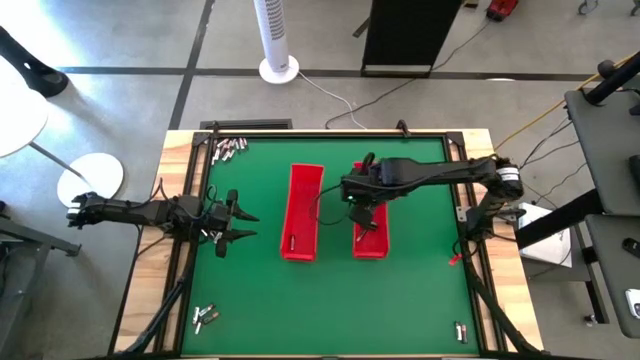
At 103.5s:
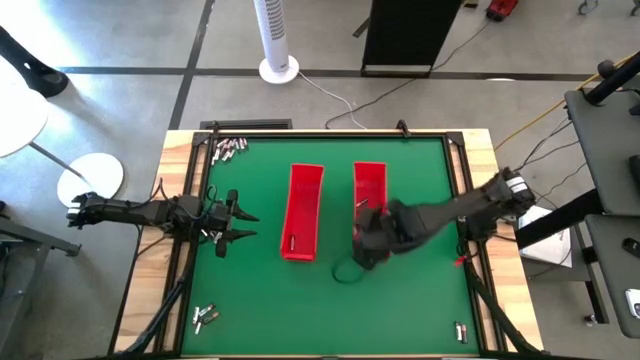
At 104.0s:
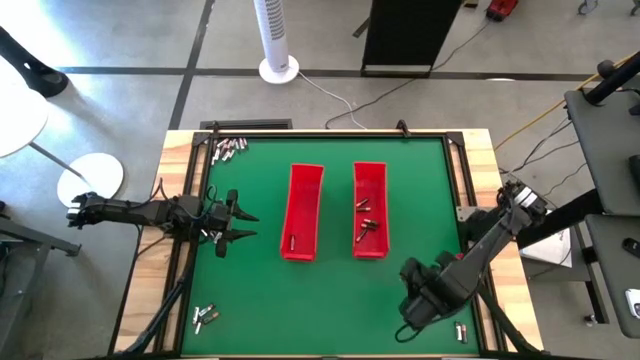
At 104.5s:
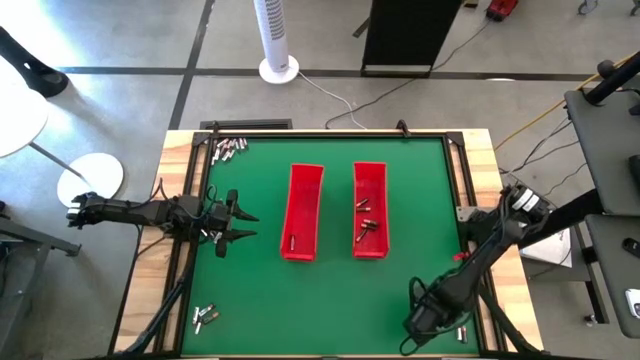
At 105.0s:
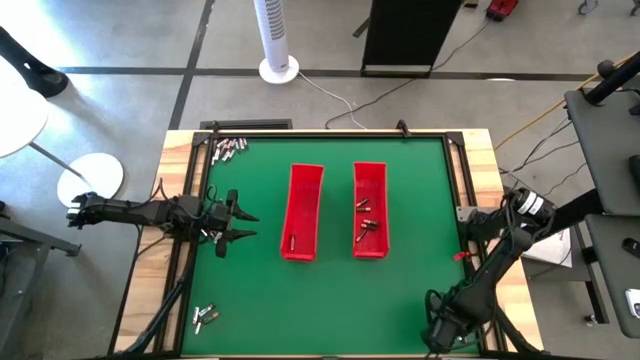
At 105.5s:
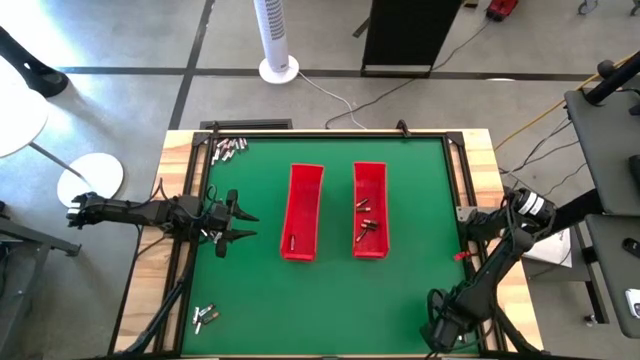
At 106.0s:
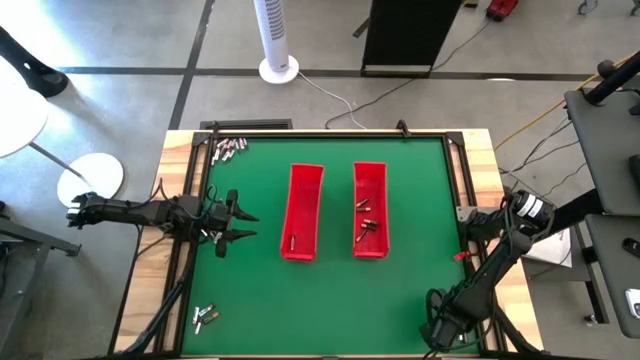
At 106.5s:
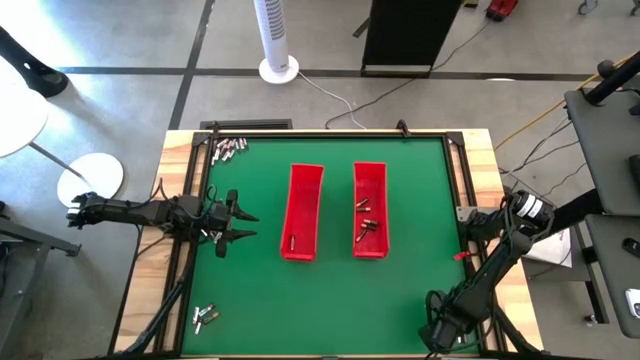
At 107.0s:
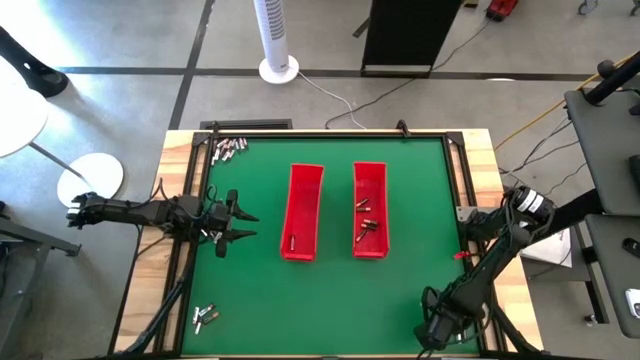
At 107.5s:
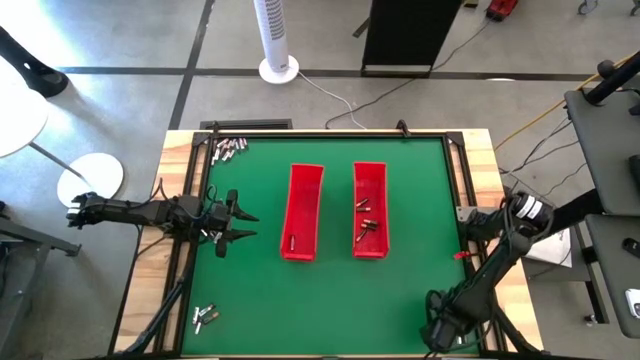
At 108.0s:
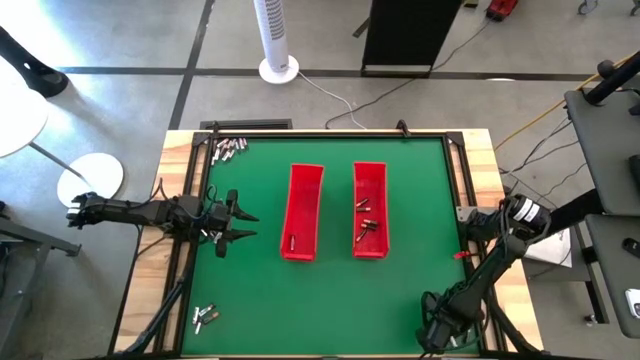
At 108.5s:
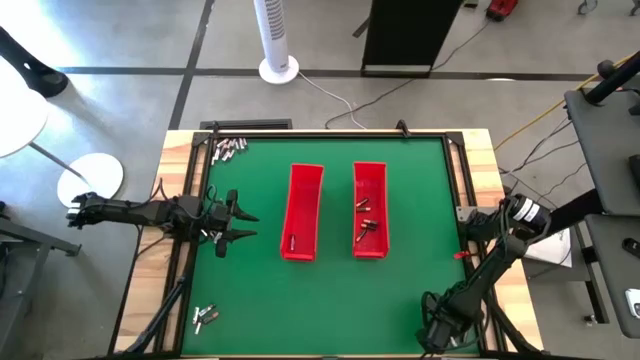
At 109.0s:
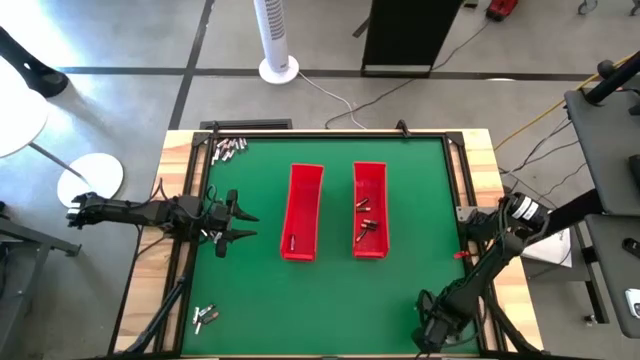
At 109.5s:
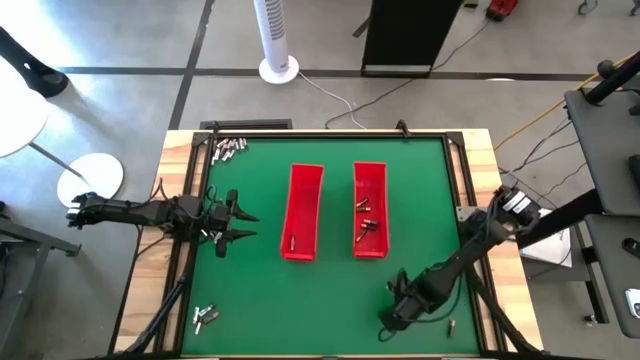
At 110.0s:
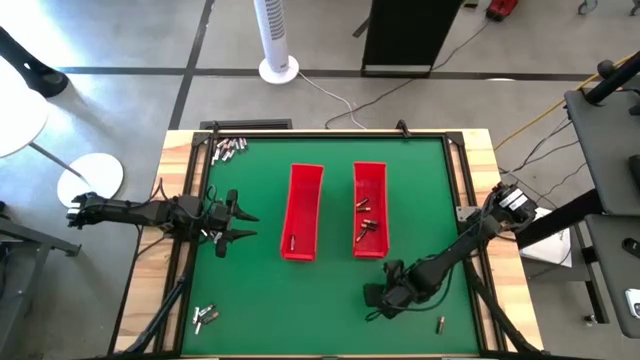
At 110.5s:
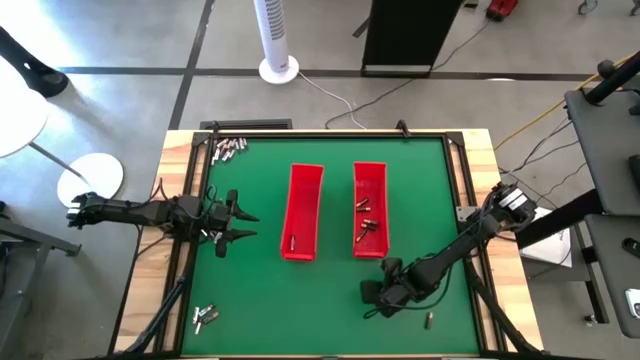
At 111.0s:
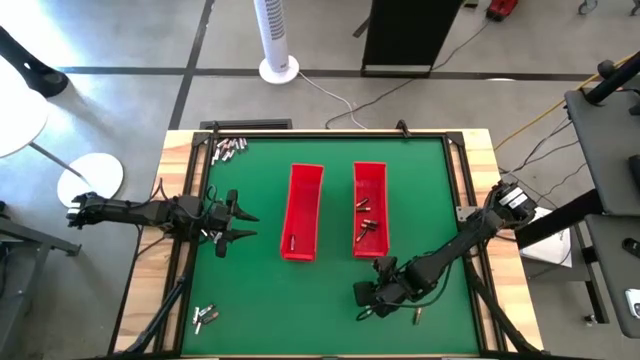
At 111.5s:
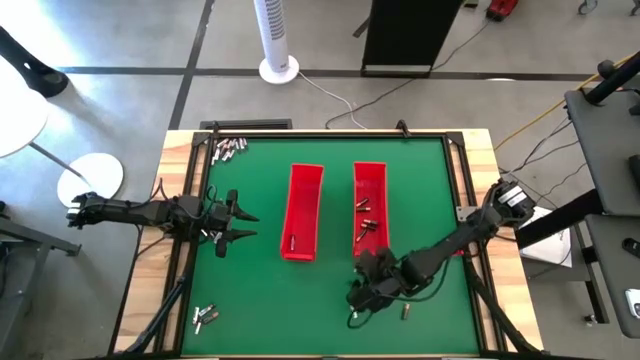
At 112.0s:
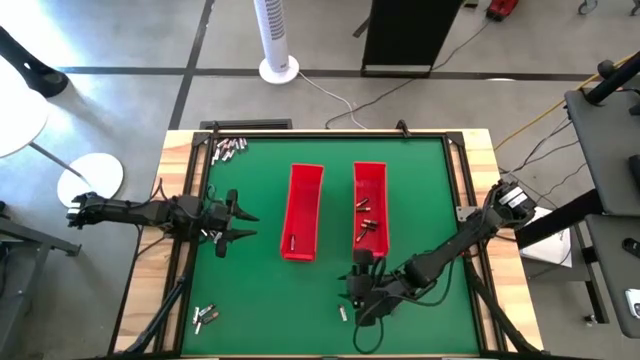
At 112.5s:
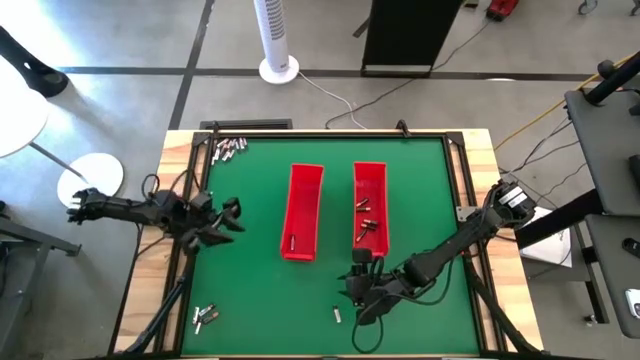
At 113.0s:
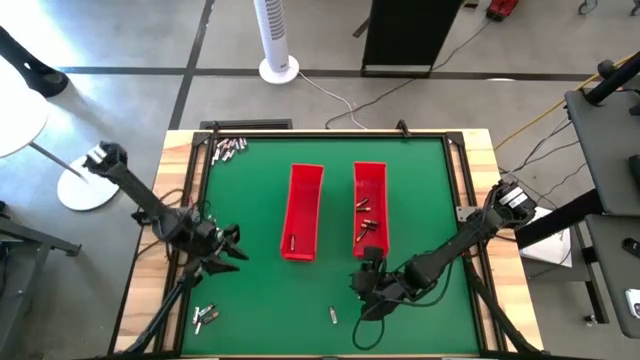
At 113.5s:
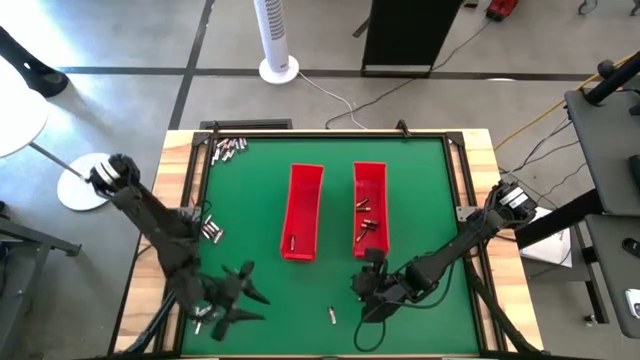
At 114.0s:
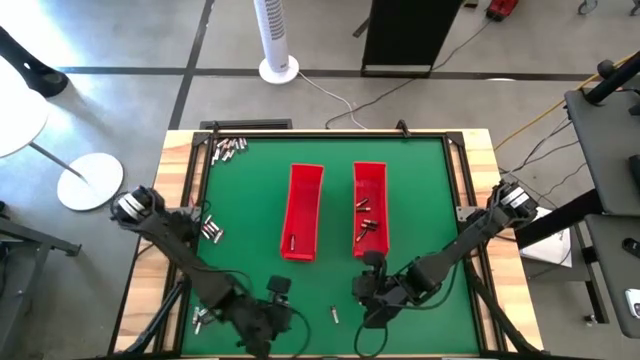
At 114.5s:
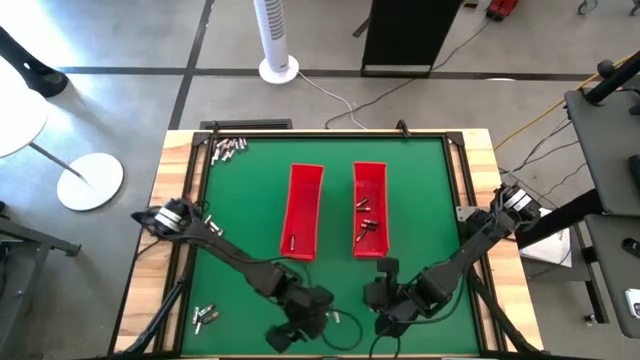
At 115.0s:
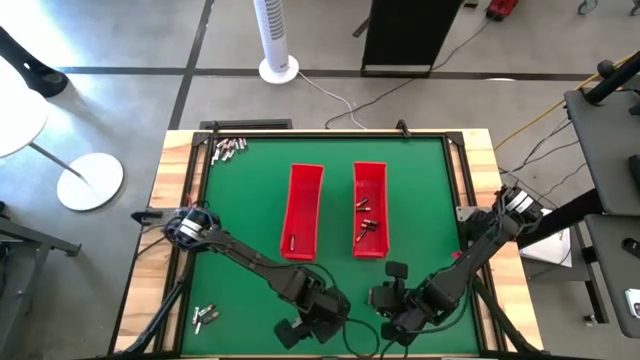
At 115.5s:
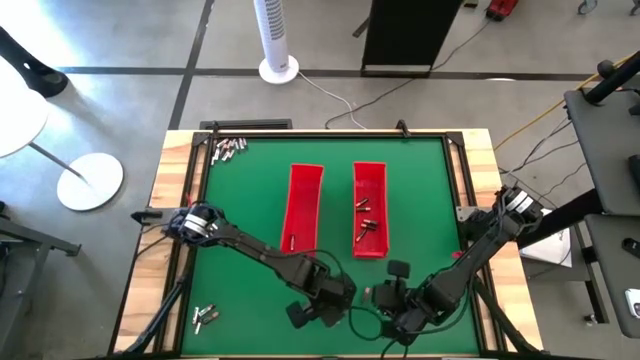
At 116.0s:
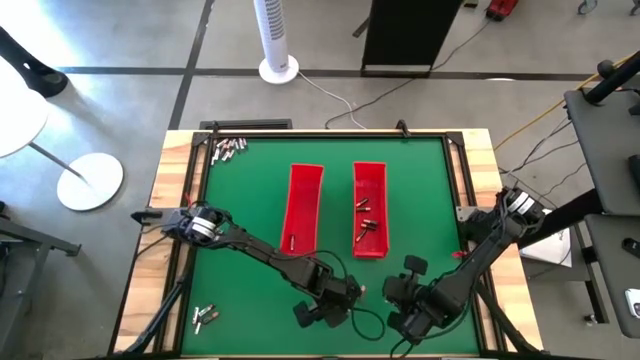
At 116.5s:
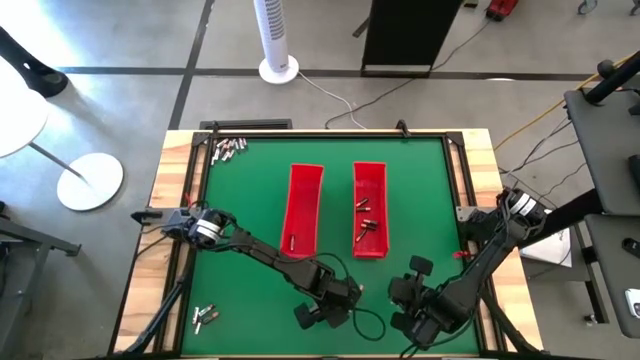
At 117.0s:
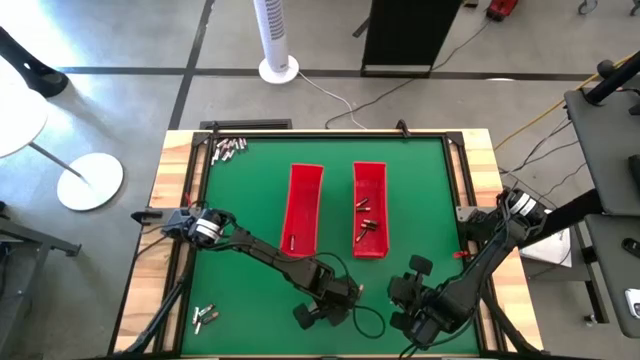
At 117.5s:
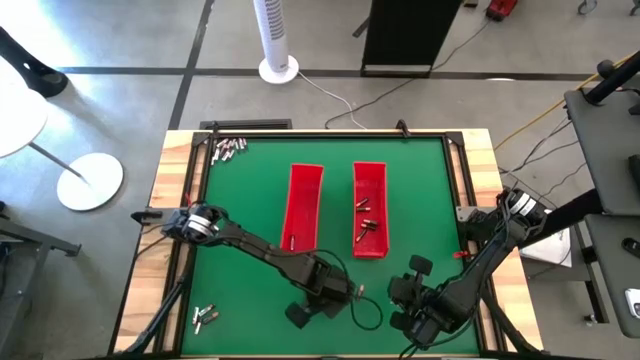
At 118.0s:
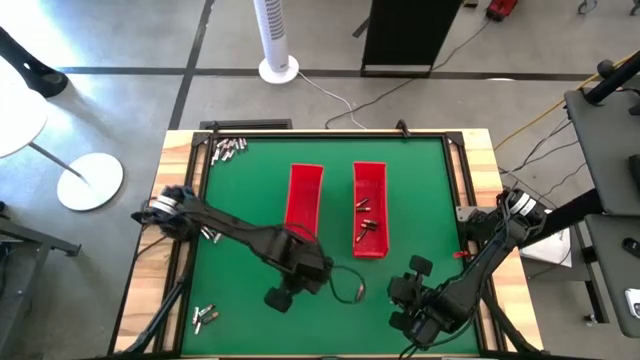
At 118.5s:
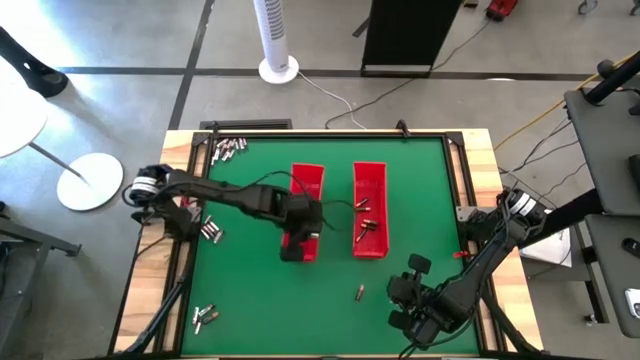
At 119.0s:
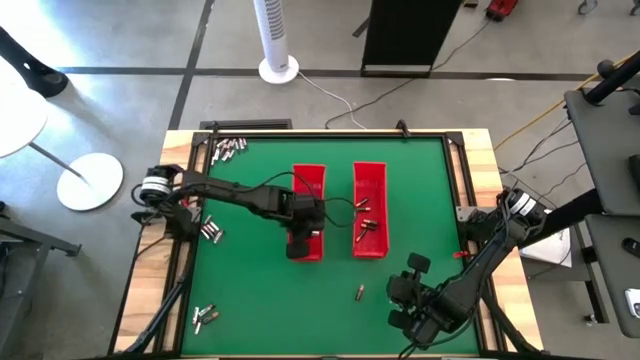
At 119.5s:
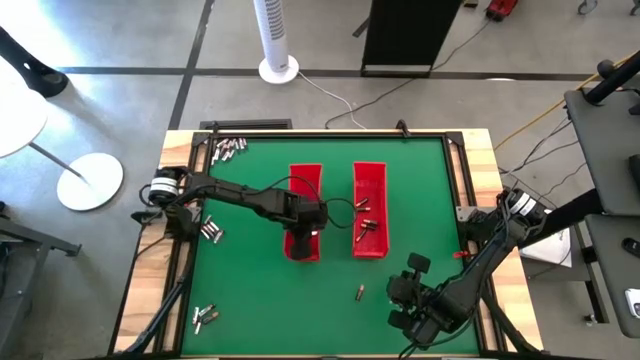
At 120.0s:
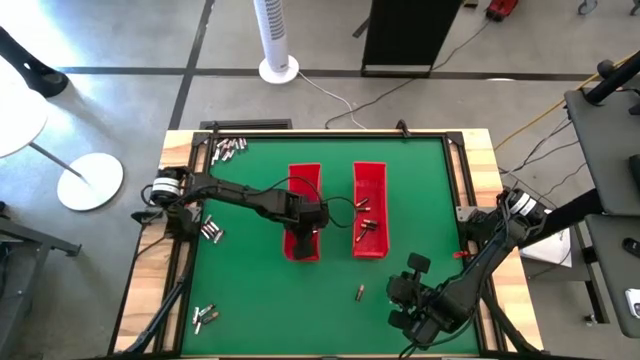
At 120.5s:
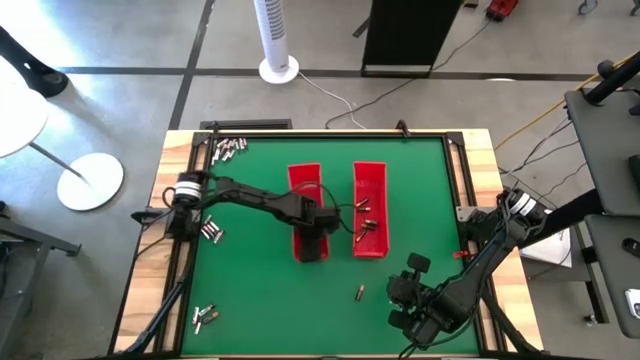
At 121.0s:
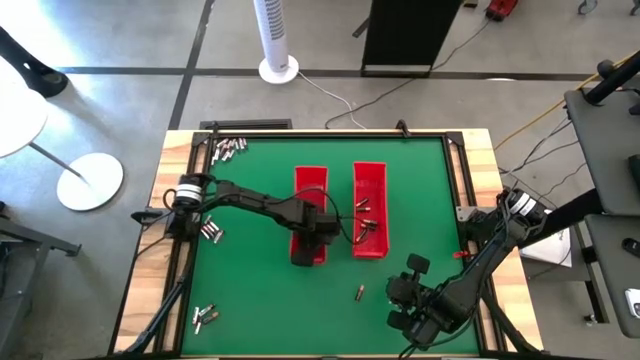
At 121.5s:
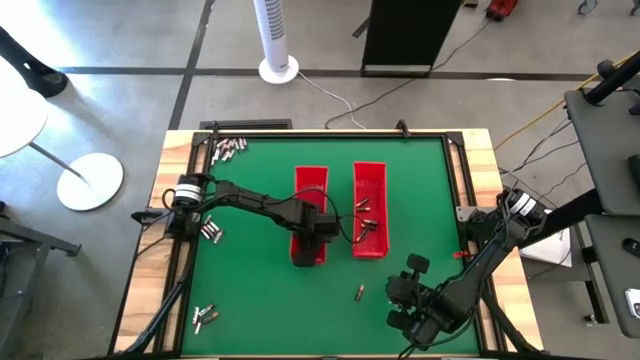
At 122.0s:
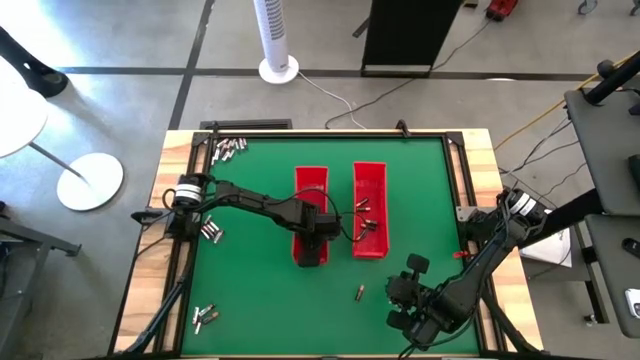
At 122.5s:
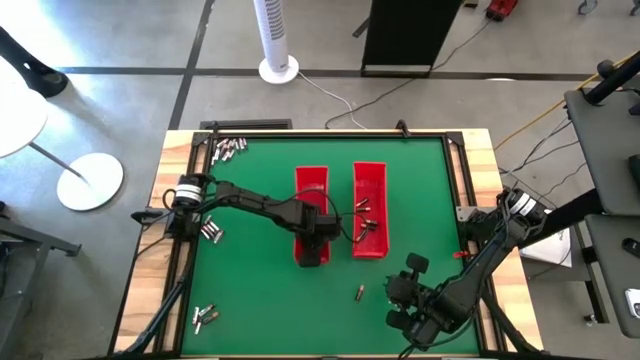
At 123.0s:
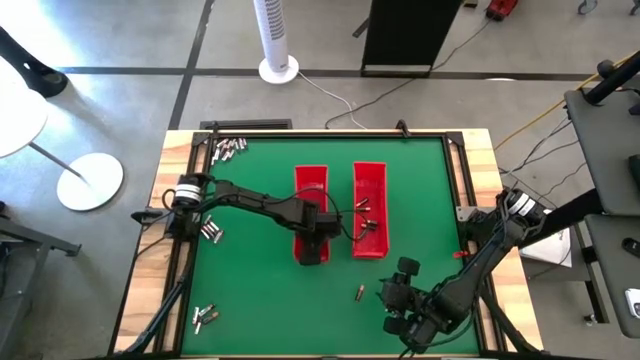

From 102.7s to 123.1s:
Task: Sort batteries
Put the silver battery into the left red bin
